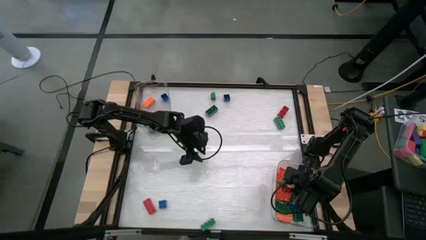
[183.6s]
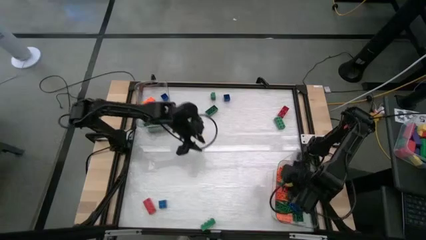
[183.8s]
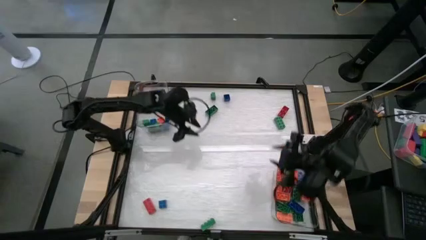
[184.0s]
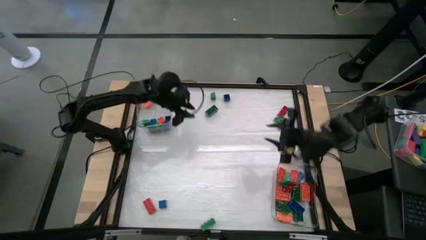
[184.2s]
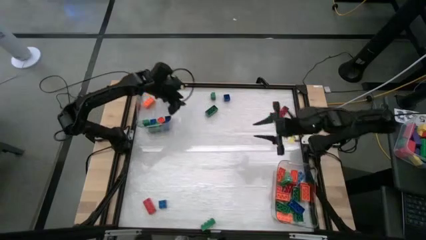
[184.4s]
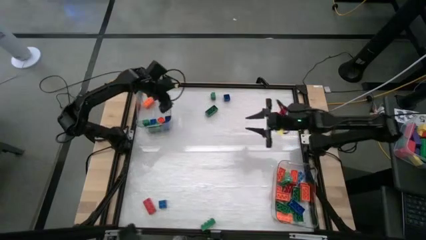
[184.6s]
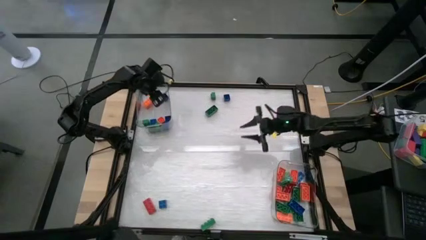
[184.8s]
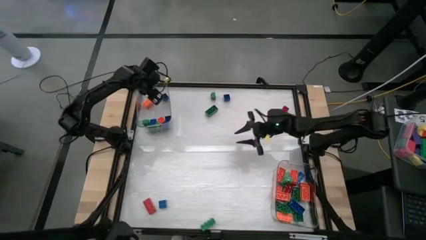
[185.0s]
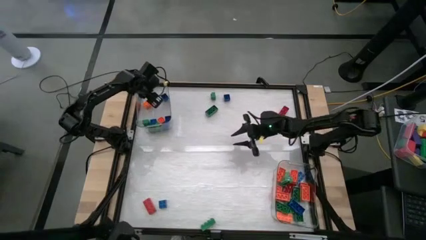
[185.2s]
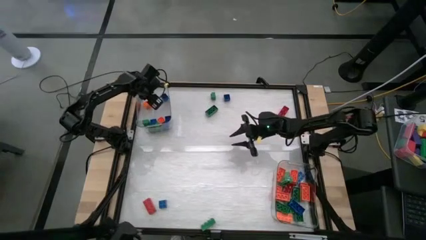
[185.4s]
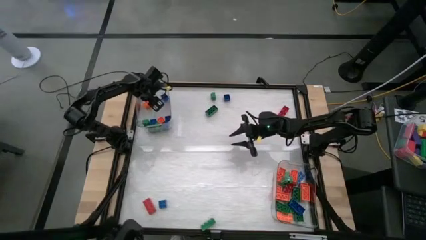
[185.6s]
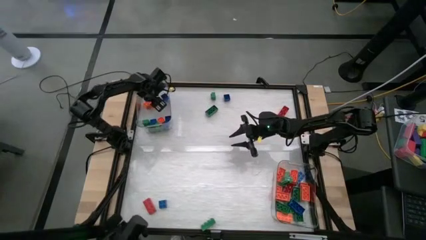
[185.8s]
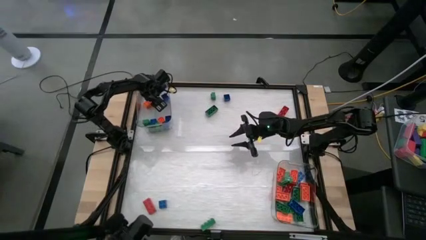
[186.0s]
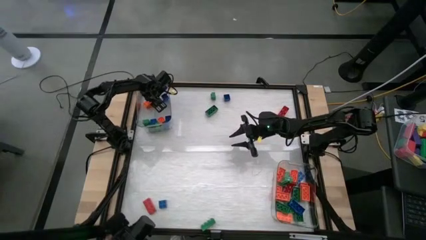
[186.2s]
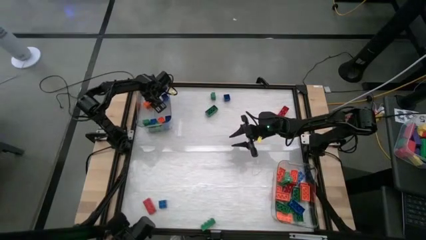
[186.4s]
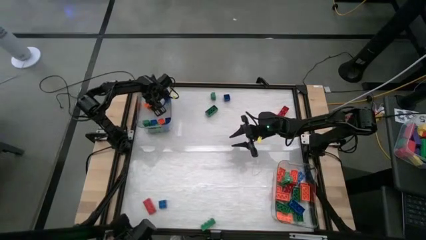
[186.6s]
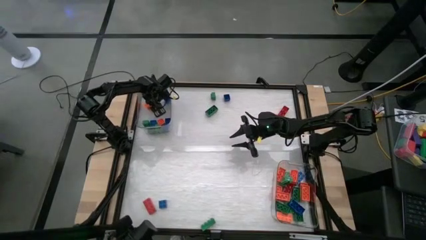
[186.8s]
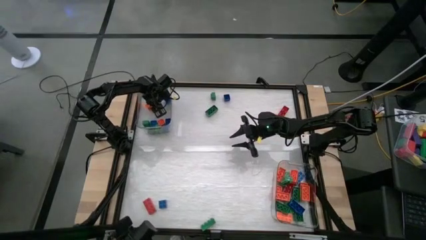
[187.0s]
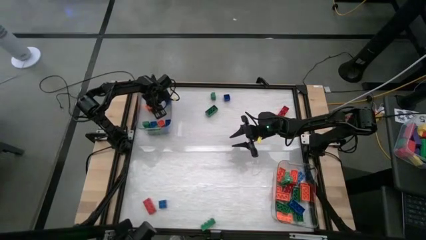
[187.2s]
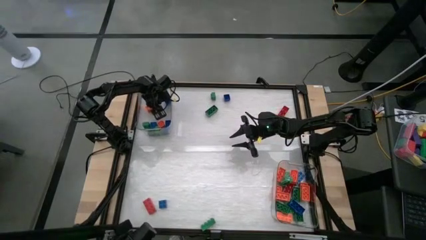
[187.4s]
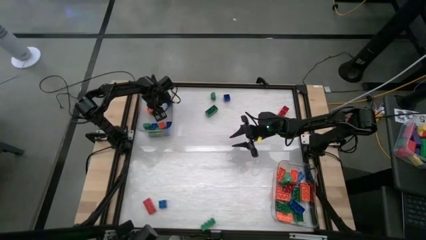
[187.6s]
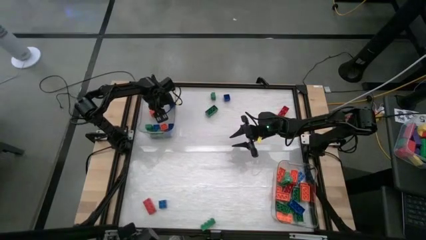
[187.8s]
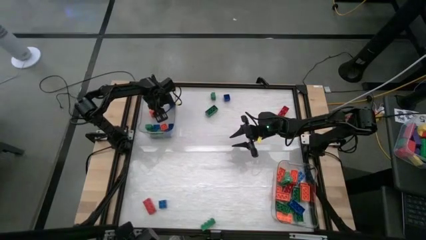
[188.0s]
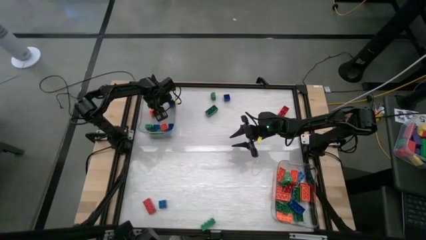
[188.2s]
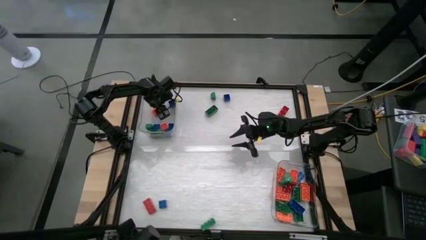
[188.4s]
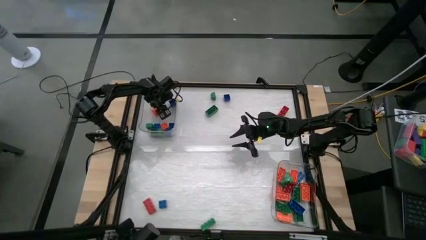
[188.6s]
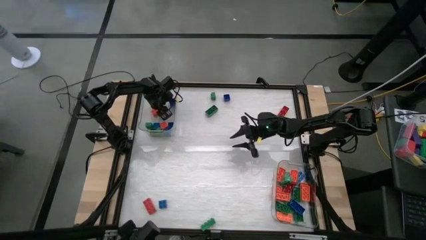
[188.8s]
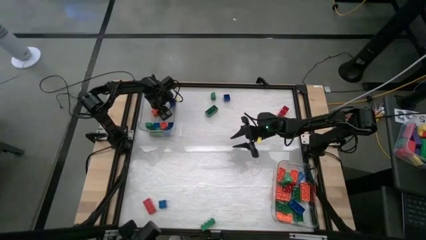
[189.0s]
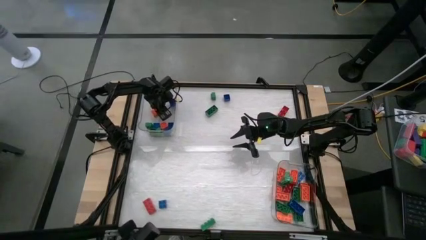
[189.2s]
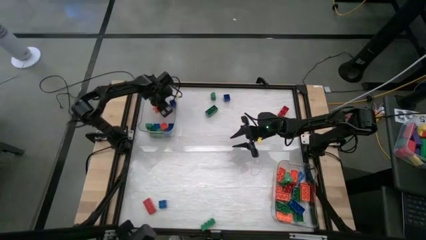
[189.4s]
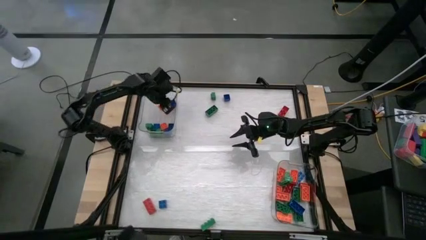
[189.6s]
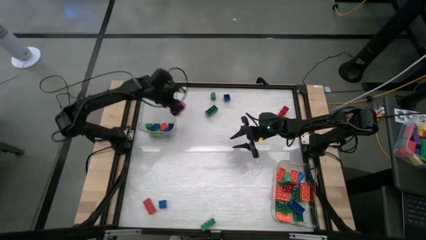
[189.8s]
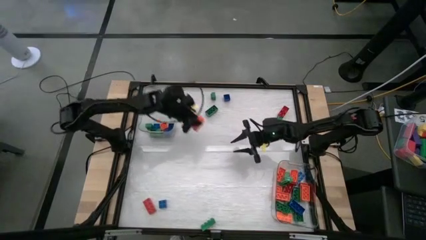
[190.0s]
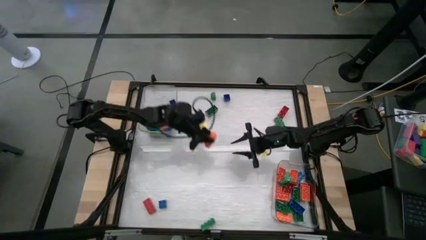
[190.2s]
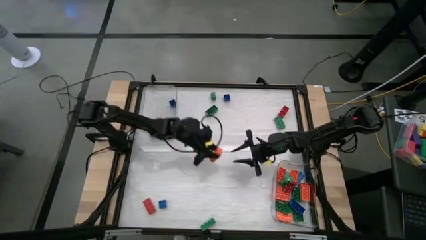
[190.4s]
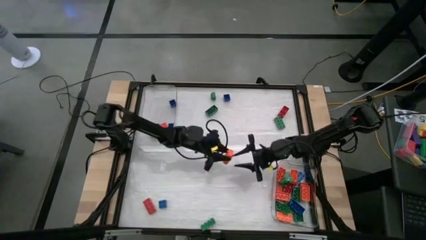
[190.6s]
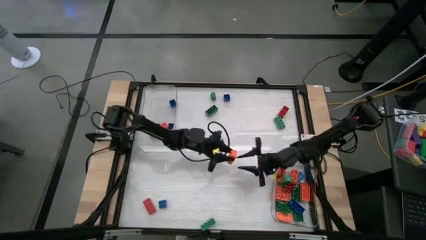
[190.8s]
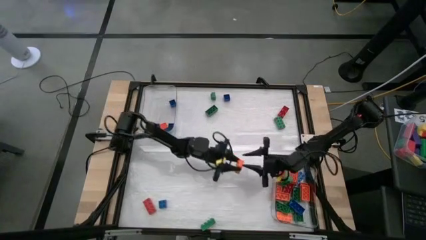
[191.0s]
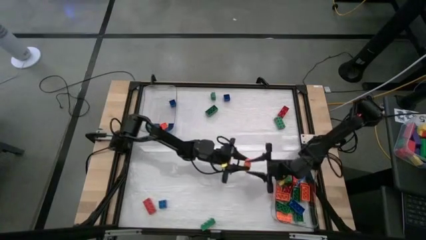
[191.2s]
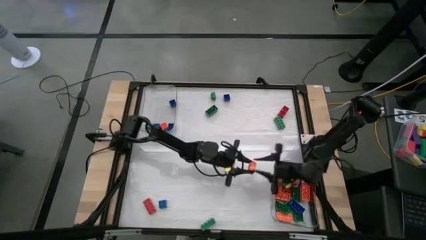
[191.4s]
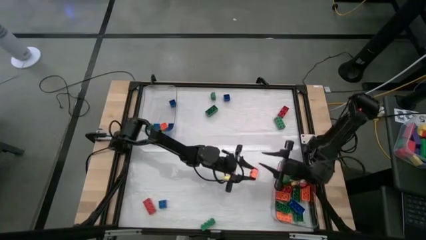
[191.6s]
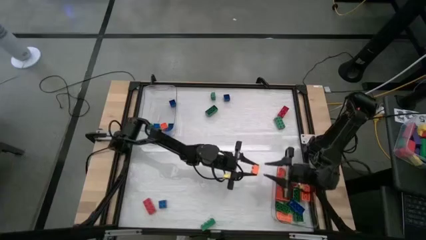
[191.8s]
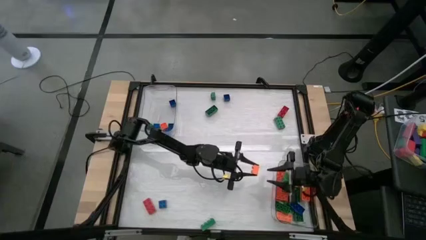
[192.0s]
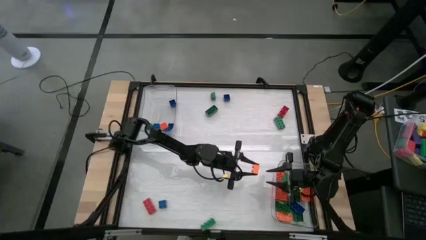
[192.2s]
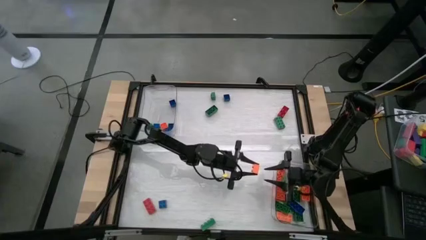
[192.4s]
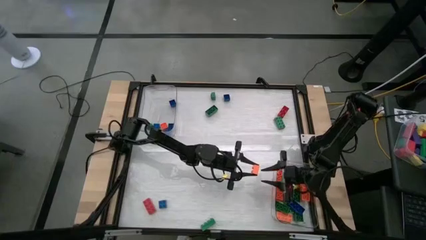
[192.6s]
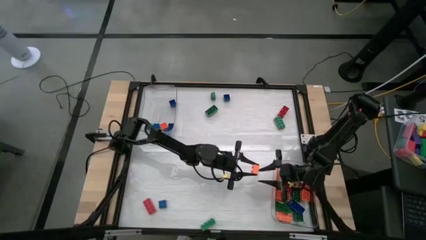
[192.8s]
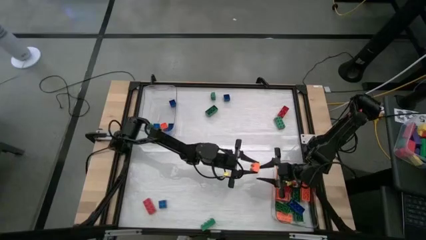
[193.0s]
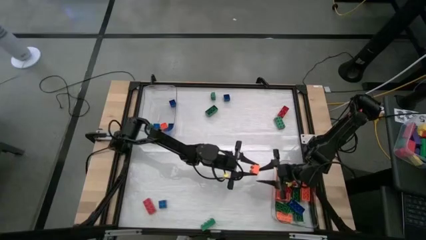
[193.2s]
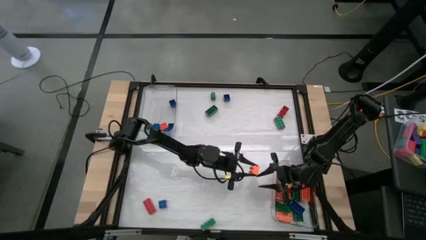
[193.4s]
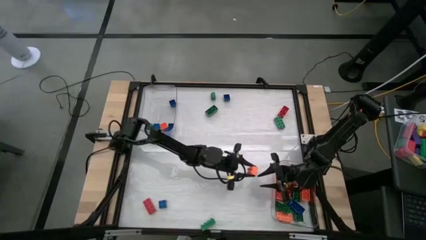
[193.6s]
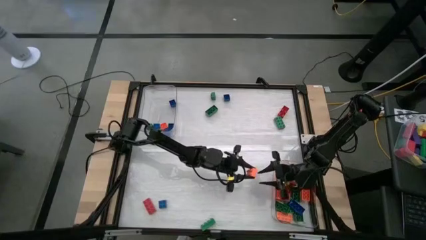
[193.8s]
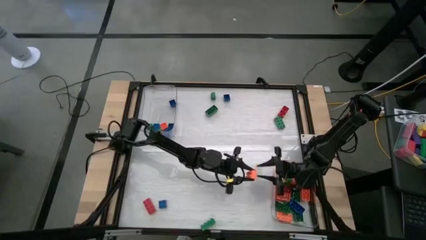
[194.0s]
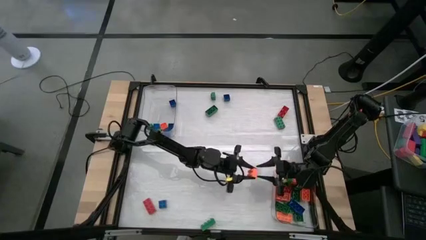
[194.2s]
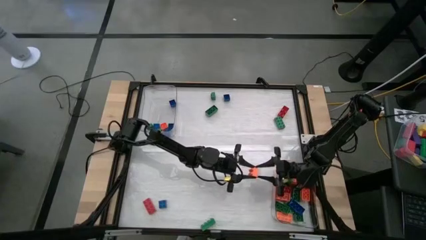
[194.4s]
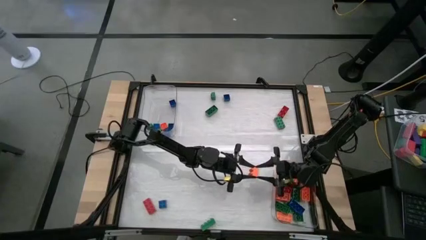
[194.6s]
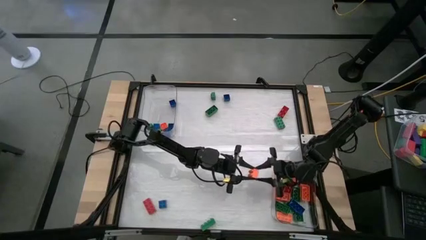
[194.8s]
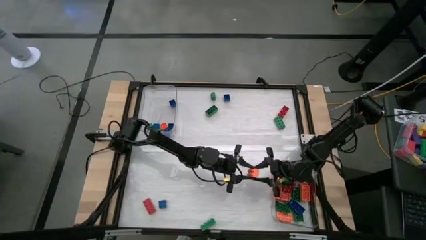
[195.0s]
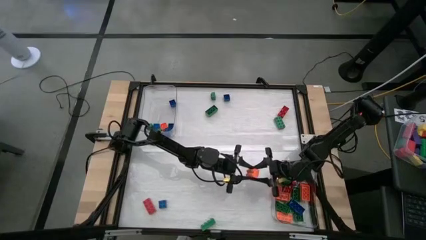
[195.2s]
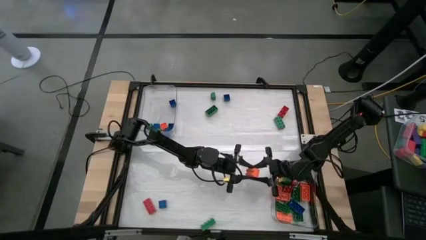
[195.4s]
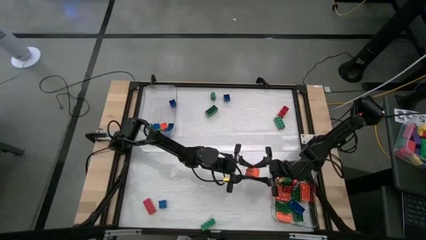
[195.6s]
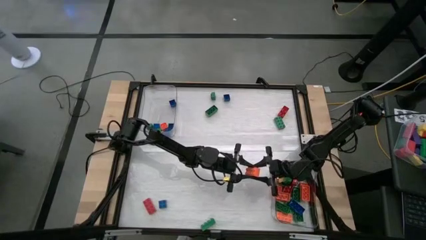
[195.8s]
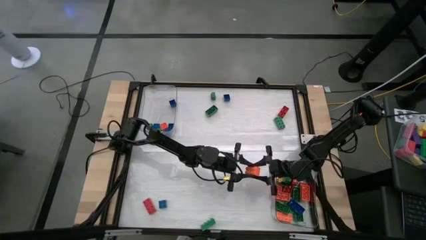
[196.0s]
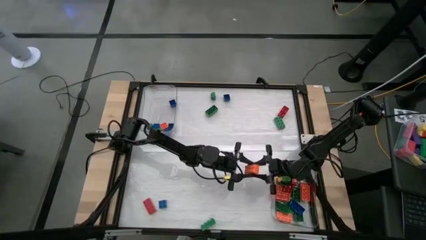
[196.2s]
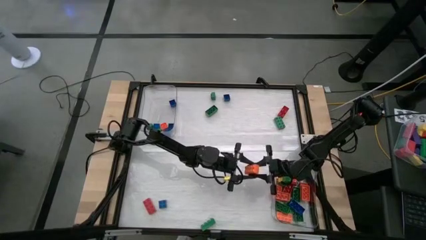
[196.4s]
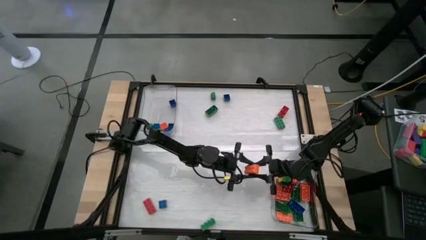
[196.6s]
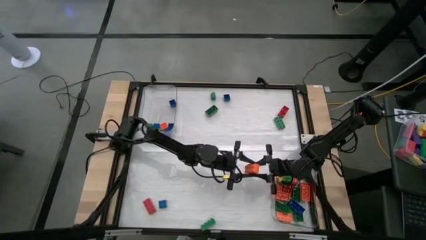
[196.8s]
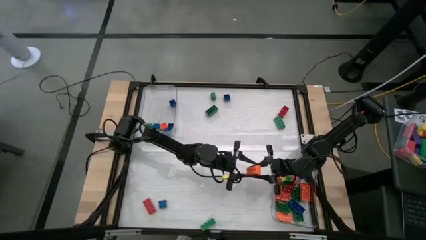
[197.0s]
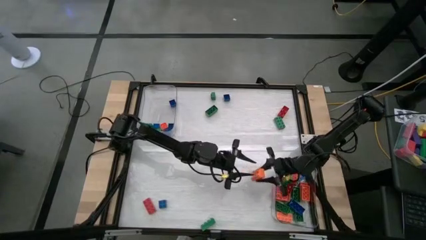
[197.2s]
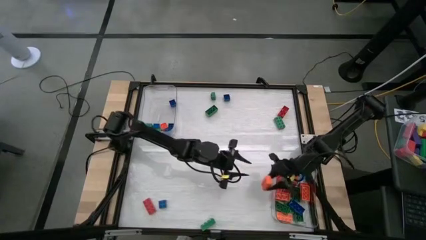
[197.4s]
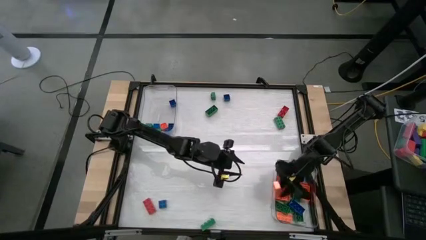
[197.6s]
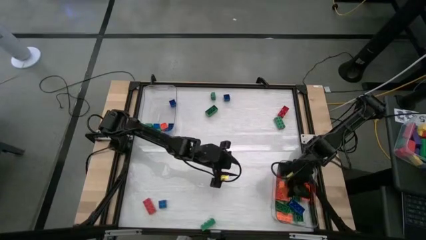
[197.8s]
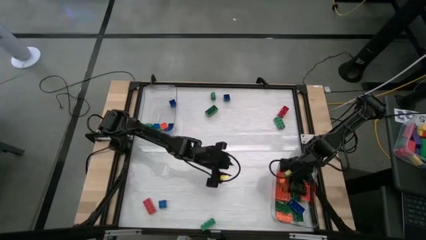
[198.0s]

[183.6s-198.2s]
Task: Sort blocks by size
Put the 8 stud orange game piece into the bottom transparent bin

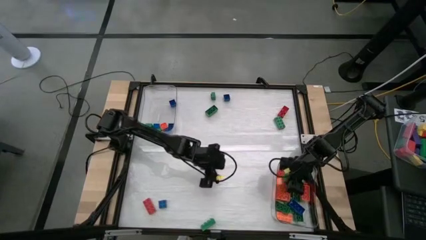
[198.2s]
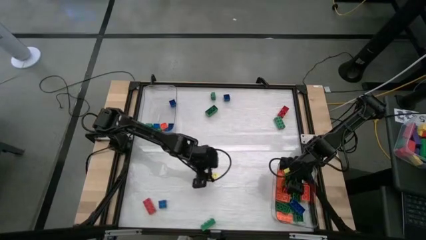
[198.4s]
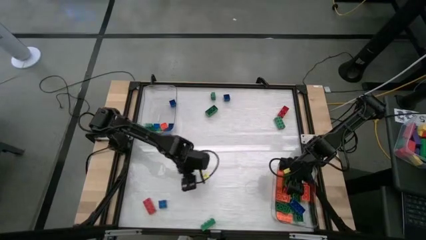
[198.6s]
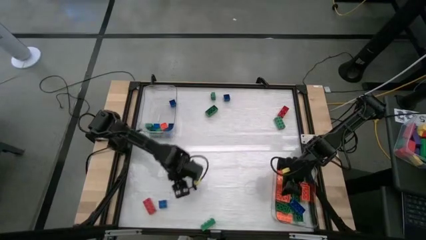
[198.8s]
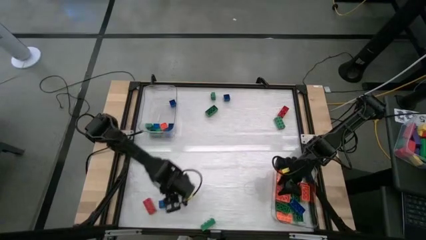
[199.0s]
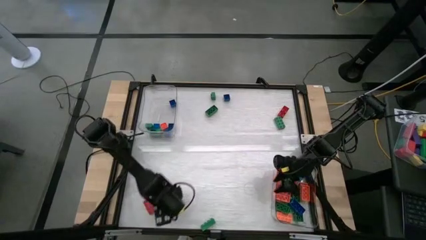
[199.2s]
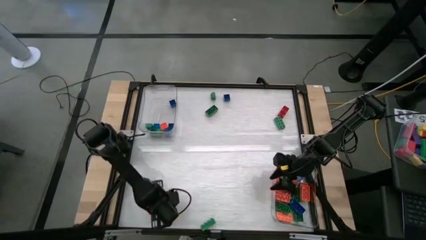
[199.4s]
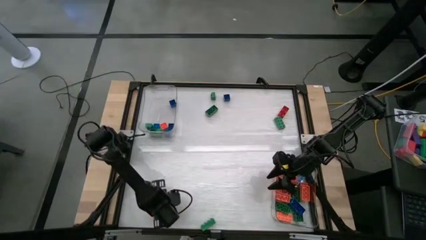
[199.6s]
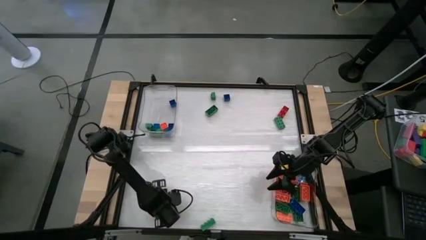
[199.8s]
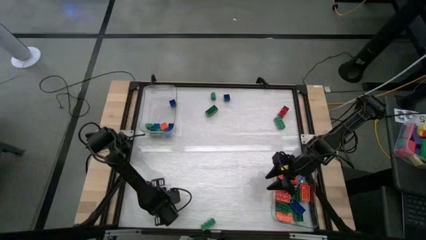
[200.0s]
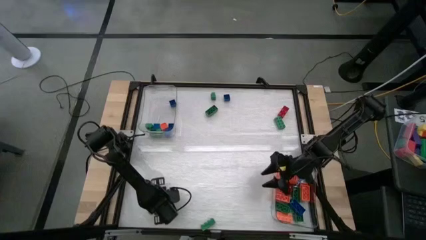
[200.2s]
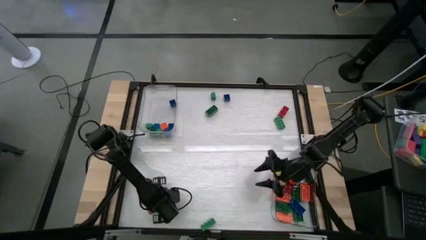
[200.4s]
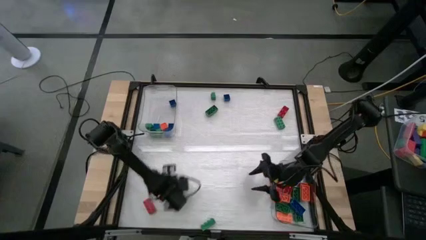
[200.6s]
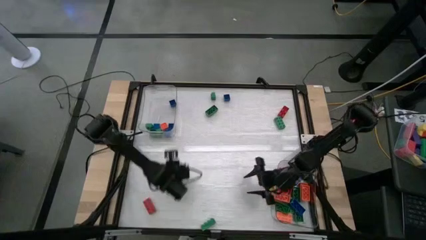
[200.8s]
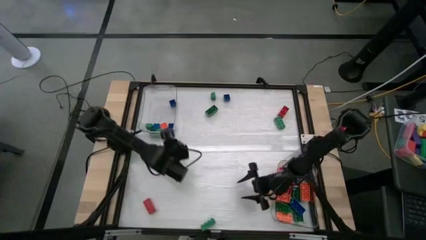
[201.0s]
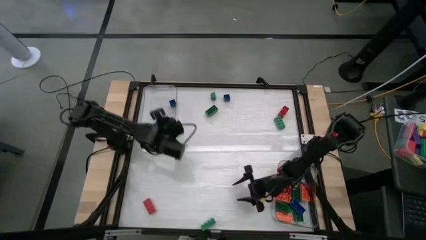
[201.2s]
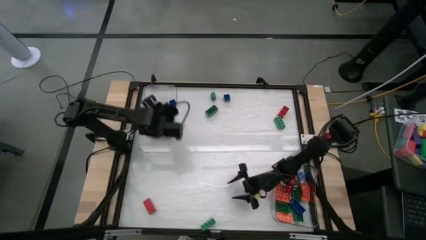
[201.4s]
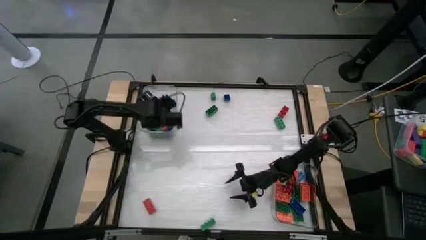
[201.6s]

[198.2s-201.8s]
Put the 4 stud blue game piece into the top transparent bin
